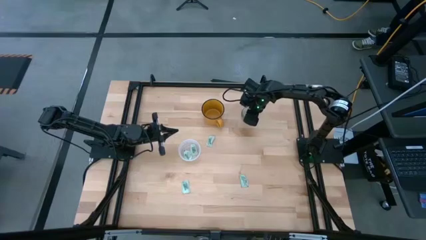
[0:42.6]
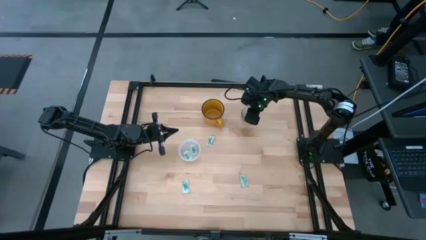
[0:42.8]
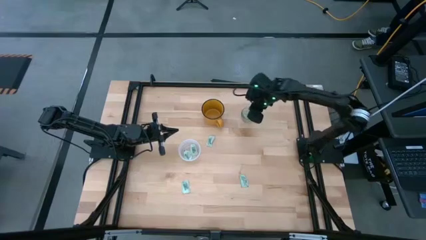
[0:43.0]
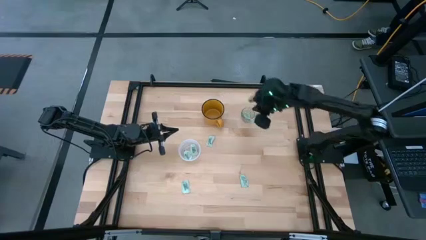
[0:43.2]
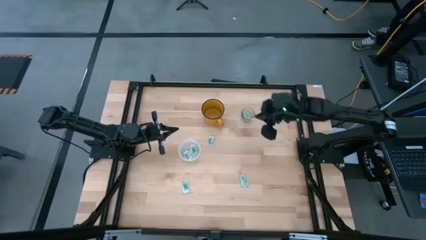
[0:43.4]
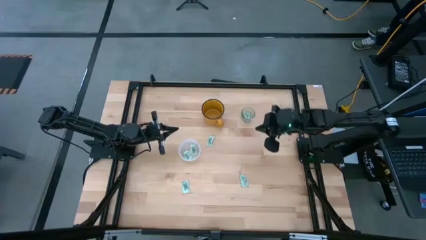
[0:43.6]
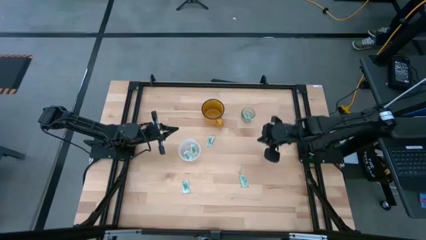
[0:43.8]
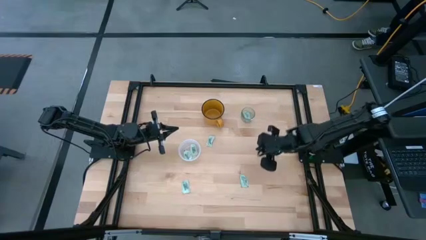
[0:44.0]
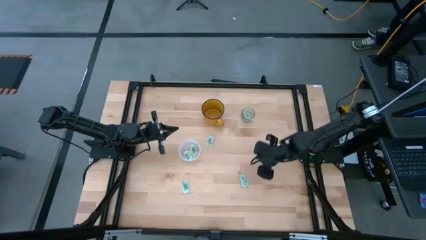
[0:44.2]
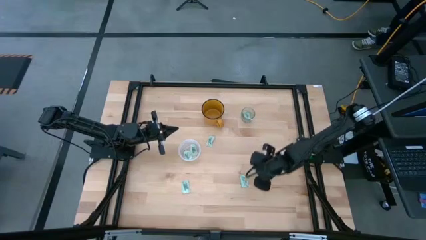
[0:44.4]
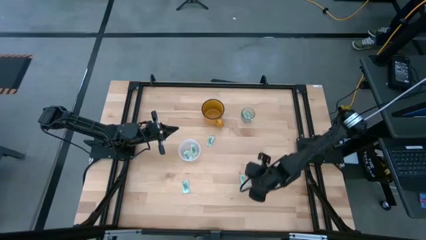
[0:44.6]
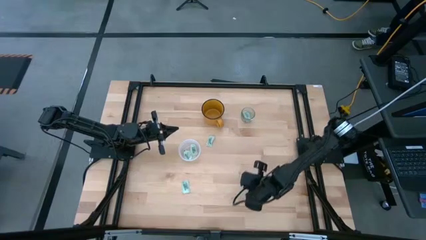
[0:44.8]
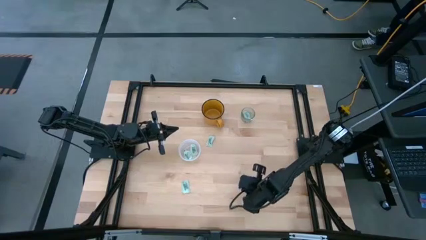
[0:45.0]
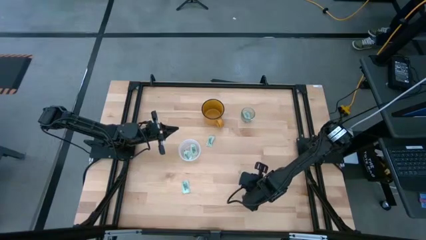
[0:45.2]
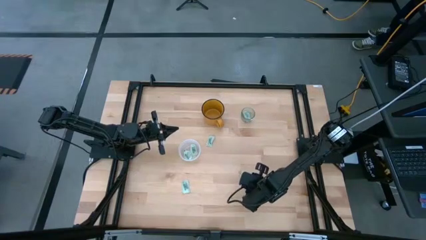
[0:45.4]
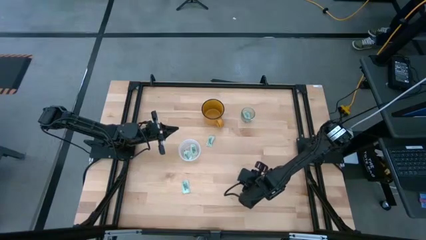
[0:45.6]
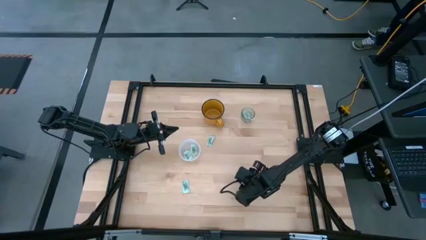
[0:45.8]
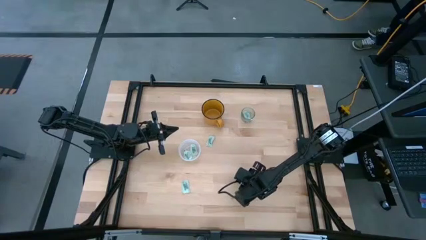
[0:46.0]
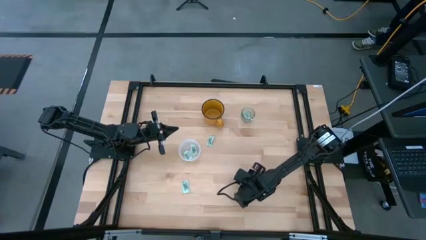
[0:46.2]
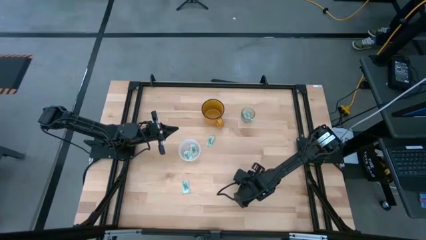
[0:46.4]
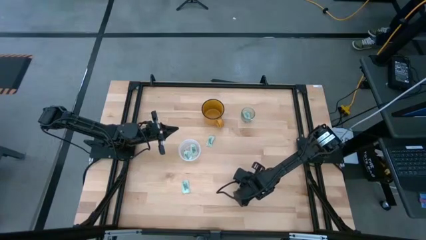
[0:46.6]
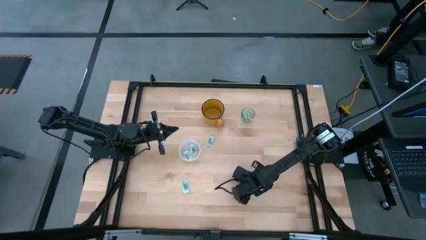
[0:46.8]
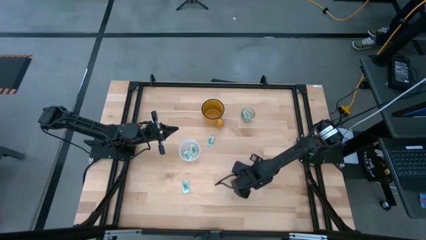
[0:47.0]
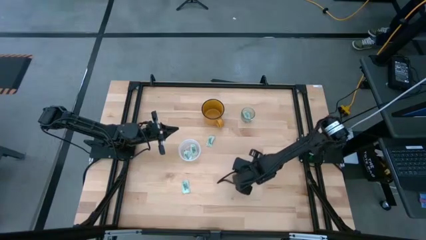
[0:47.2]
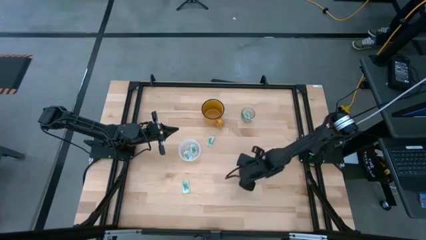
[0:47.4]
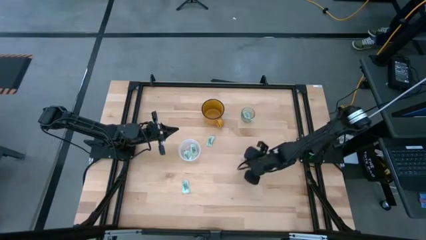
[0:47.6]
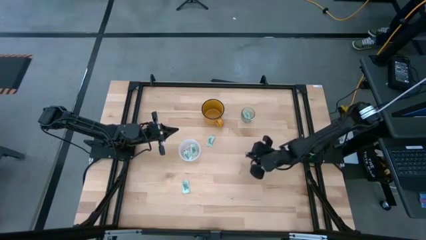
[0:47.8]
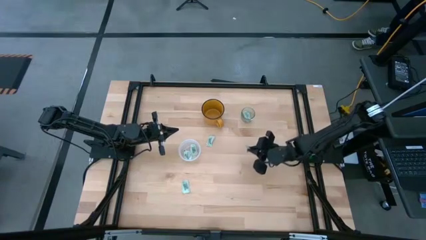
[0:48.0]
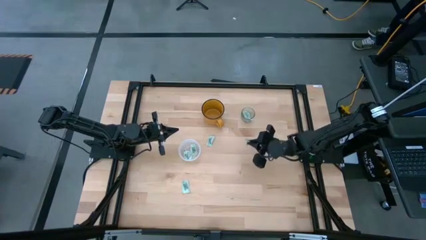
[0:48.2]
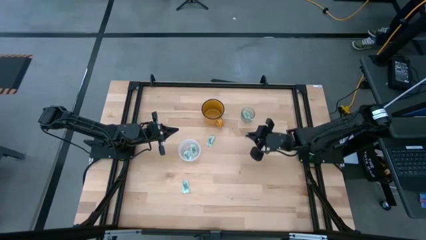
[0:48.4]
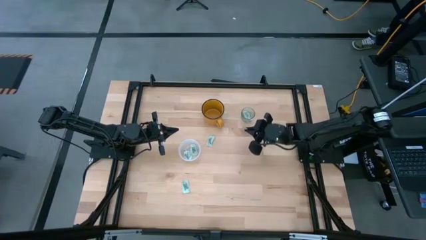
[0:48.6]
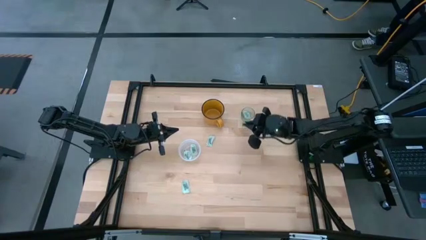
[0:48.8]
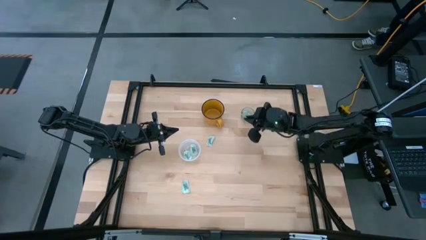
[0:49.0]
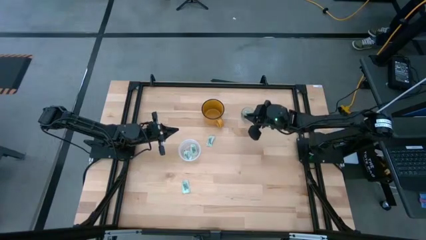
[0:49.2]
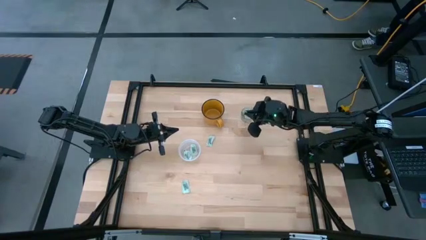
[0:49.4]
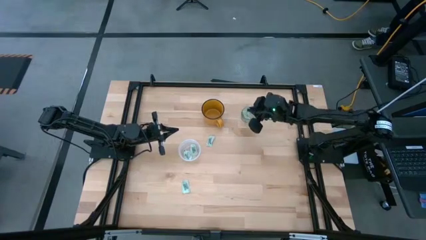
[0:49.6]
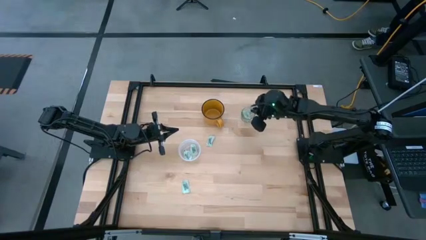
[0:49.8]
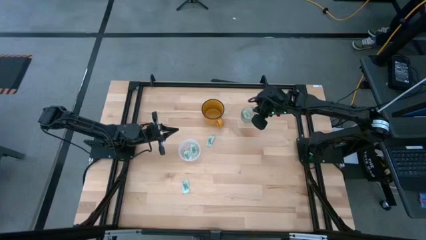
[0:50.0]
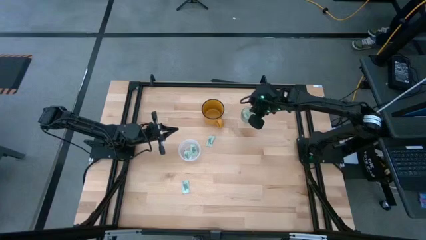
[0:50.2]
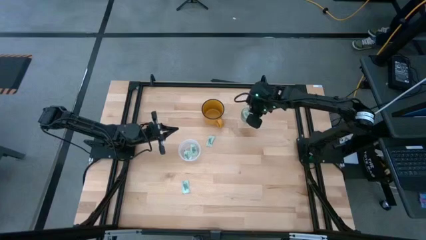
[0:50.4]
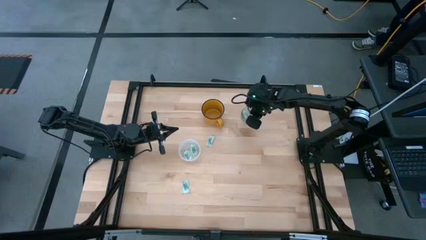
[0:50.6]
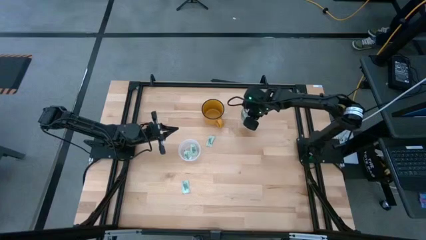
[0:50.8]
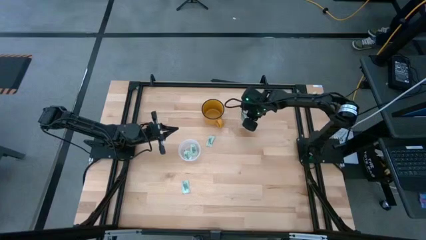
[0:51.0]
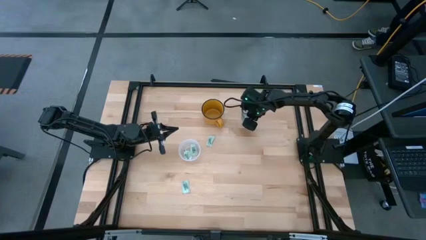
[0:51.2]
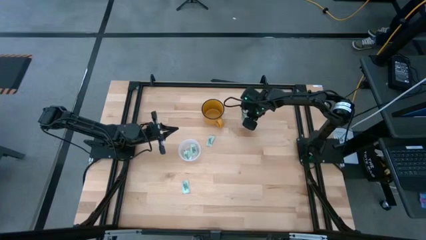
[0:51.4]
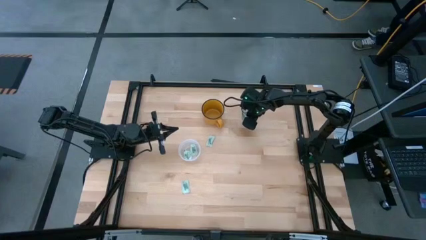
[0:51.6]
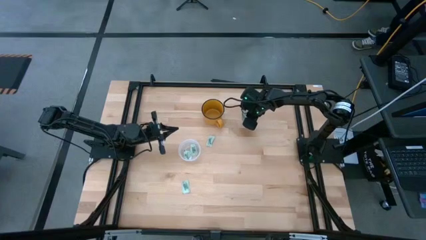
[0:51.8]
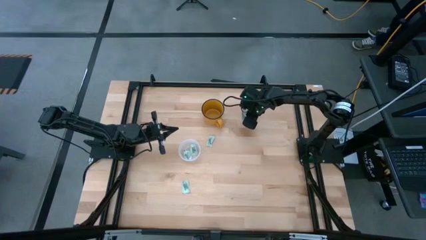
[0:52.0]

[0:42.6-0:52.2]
Task: Pick and place Stevia / Truvia into bins
Put the stevia packet into the transparent container

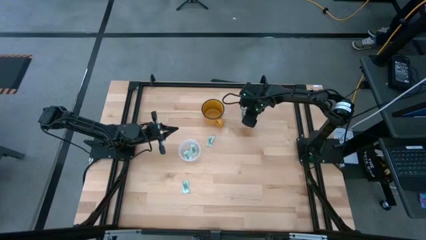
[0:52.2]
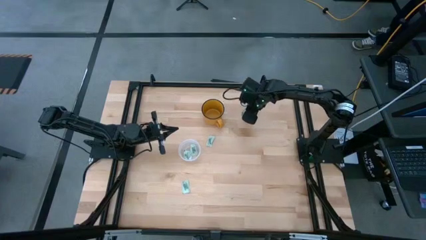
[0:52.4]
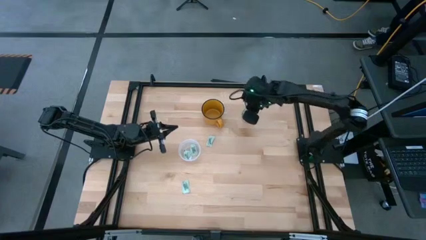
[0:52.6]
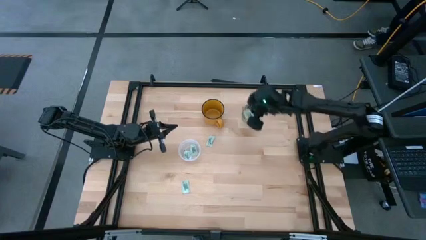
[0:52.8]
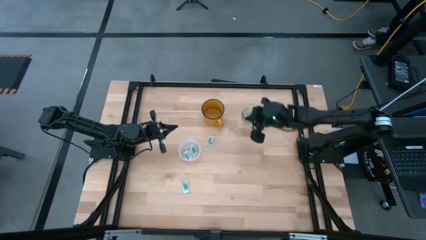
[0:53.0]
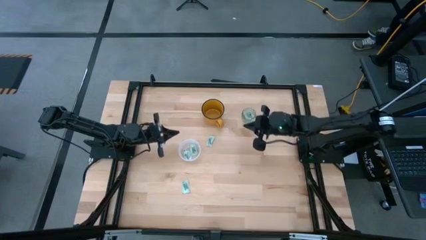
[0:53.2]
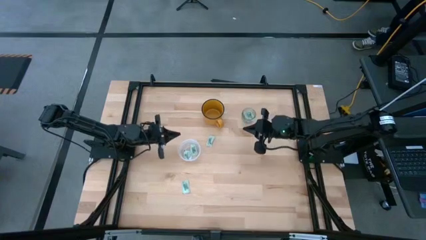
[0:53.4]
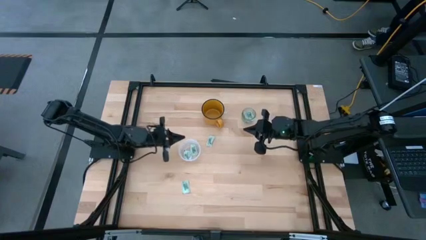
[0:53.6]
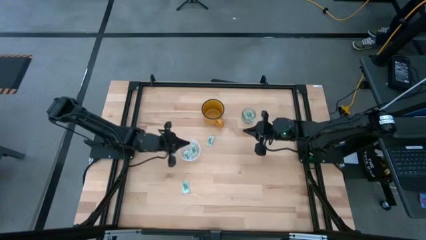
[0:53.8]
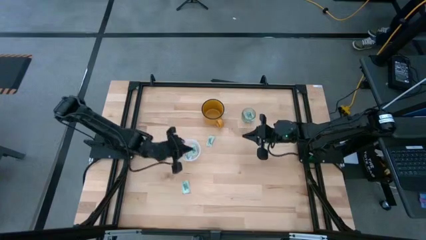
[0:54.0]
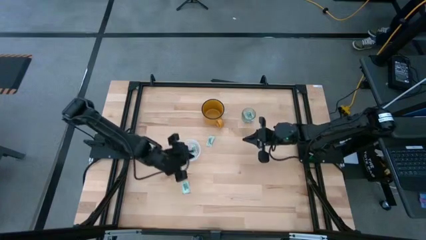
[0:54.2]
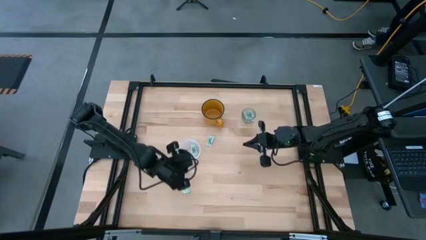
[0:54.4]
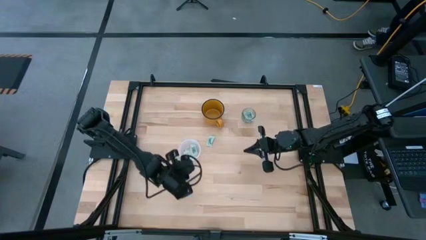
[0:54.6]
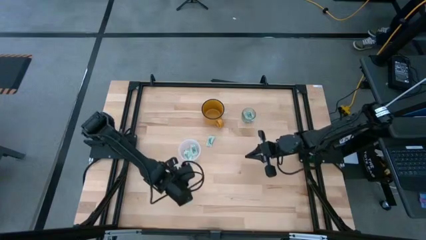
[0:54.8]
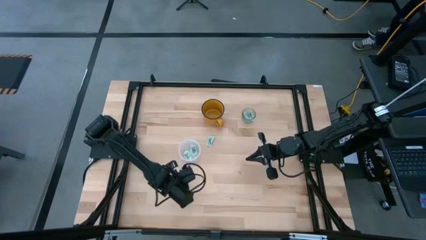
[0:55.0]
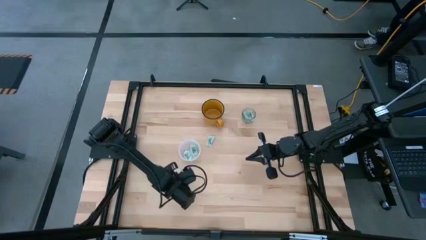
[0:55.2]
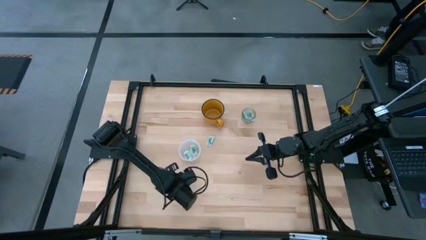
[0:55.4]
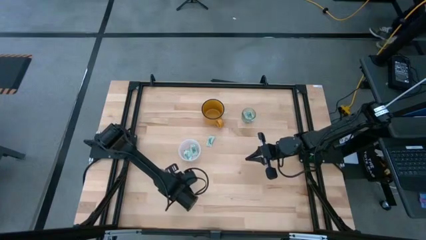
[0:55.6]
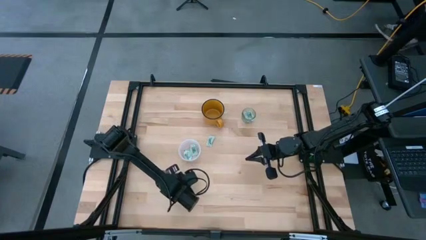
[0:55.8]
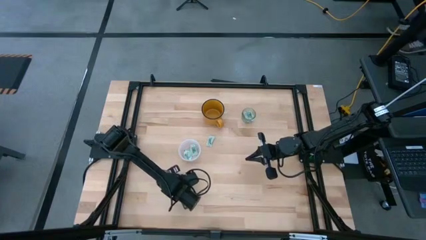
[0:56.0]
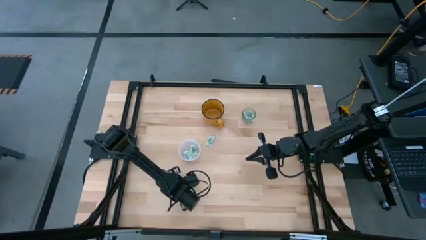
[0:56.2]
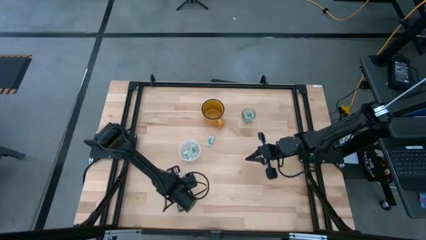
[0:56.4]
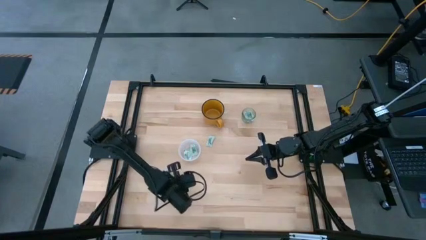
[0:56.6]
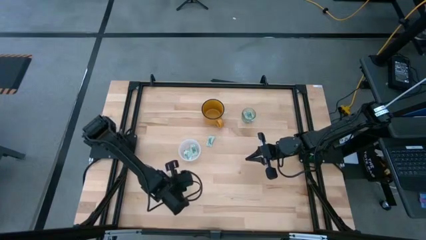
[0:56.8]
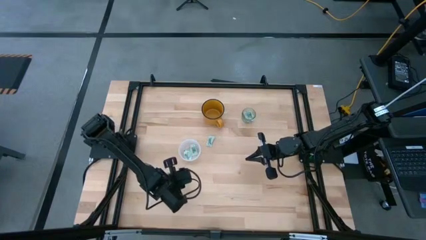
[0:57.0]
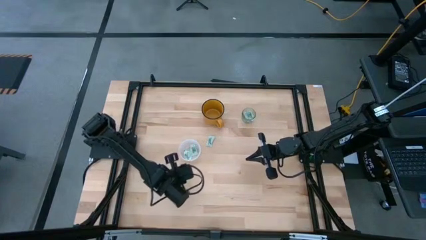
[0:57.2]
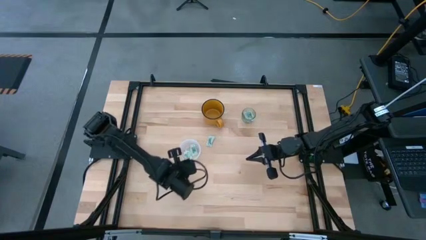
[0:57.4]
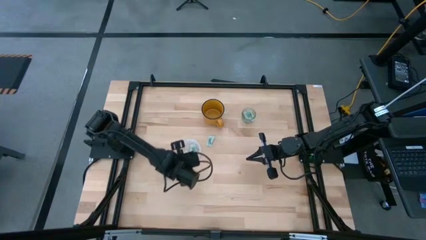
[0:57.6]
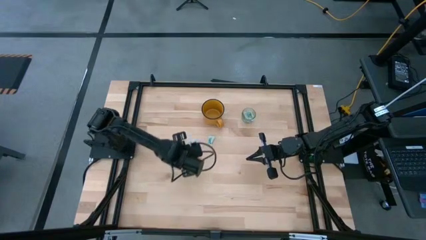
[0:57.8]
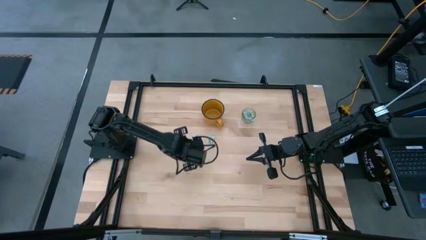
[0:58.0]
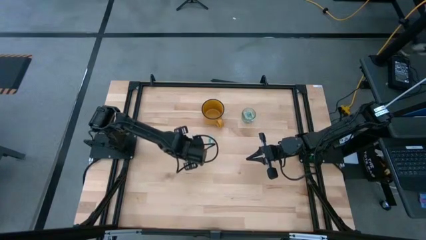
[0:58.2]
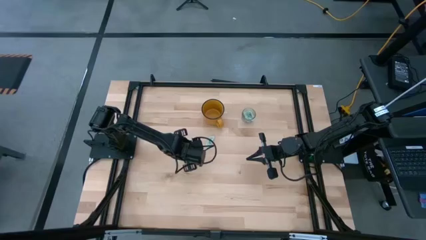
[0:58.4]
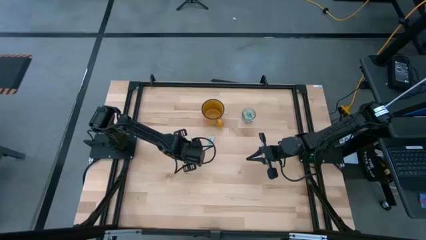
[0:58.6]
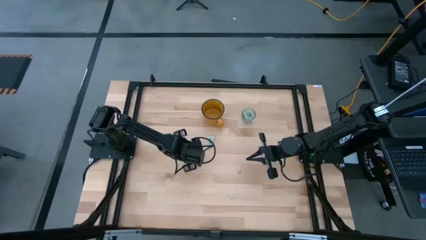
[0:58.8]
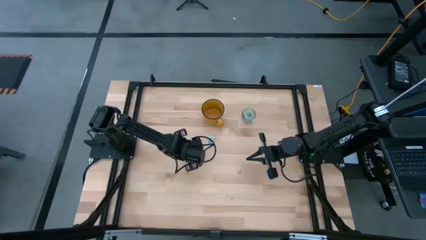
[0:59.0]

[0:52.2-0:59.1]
Put the stevia packet into the transparent container
